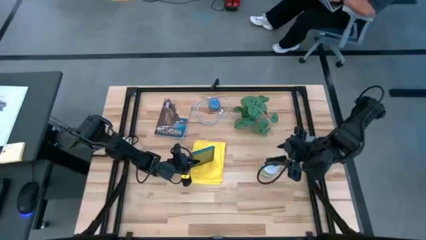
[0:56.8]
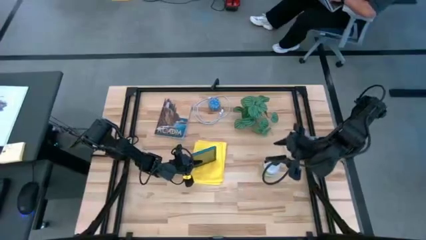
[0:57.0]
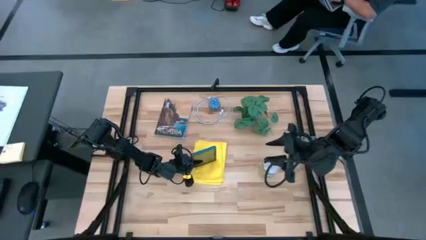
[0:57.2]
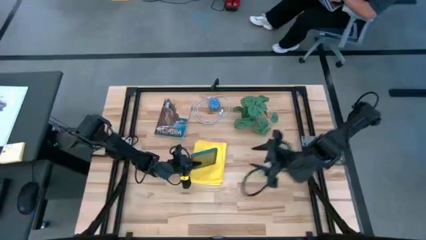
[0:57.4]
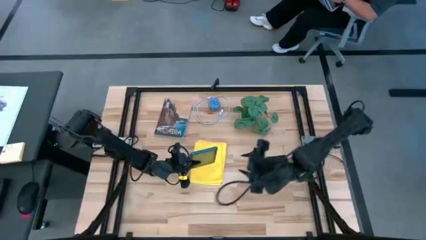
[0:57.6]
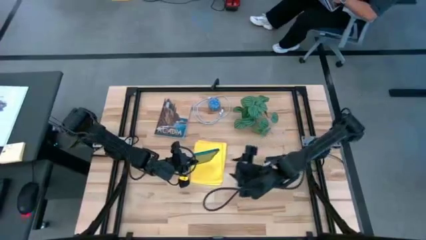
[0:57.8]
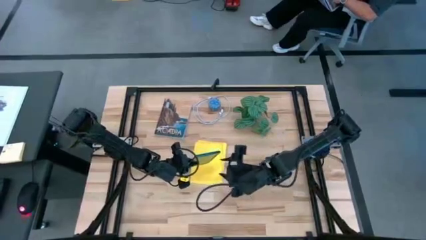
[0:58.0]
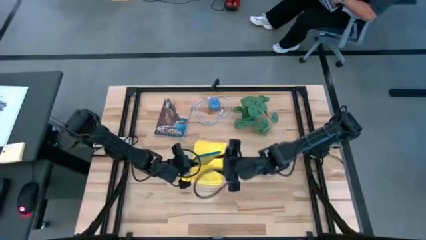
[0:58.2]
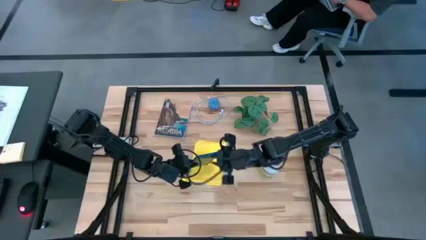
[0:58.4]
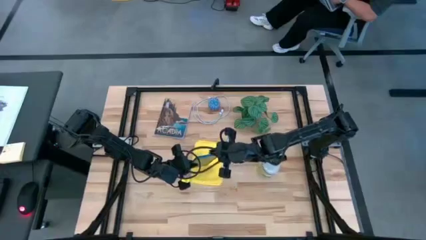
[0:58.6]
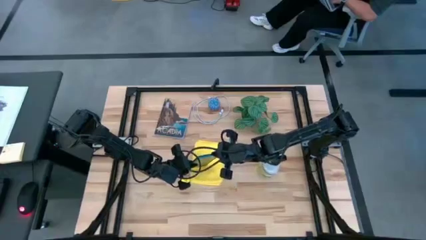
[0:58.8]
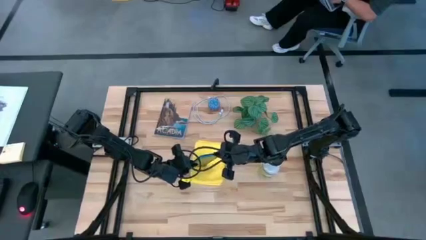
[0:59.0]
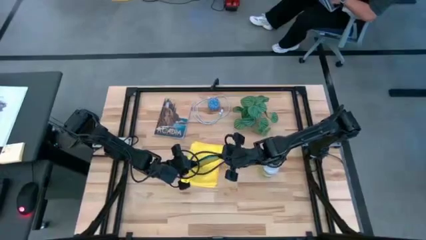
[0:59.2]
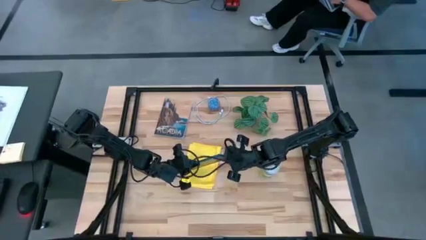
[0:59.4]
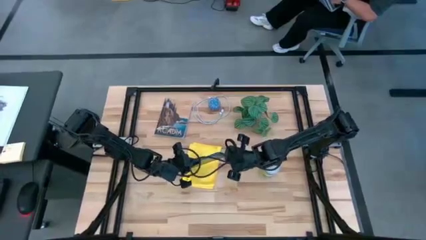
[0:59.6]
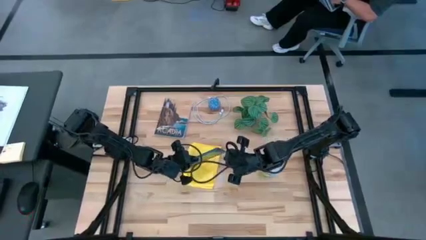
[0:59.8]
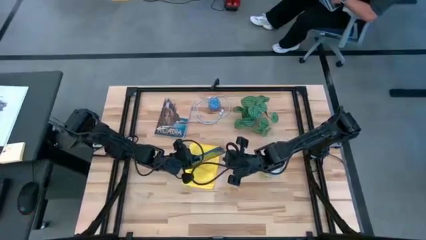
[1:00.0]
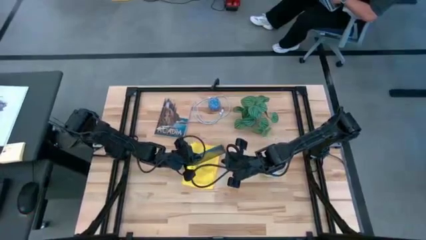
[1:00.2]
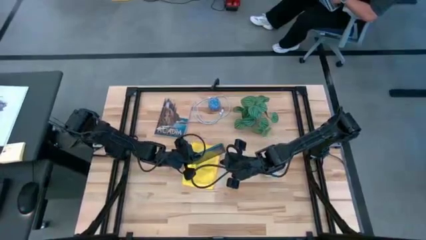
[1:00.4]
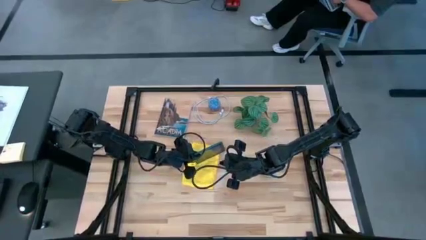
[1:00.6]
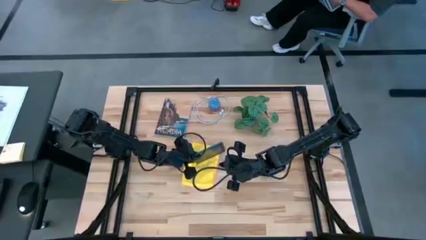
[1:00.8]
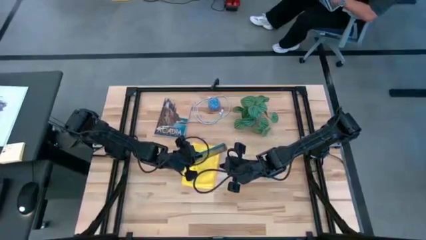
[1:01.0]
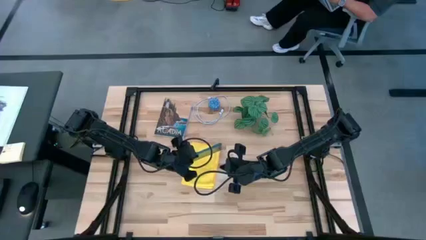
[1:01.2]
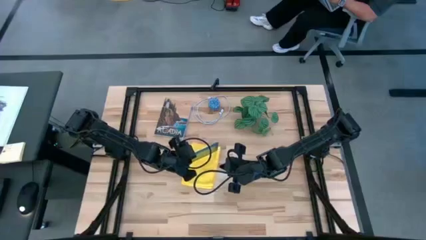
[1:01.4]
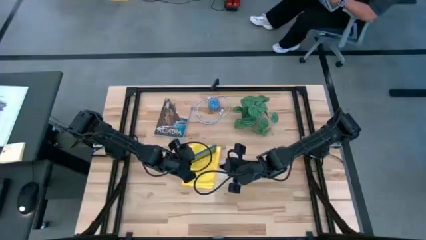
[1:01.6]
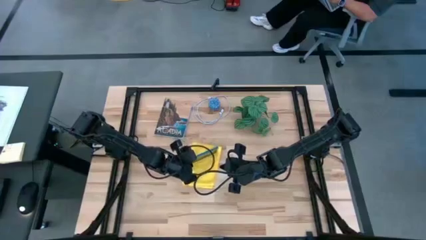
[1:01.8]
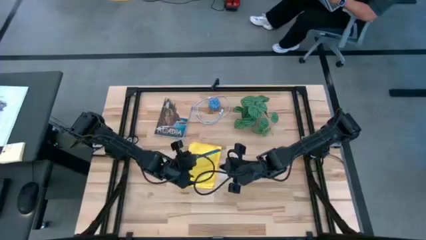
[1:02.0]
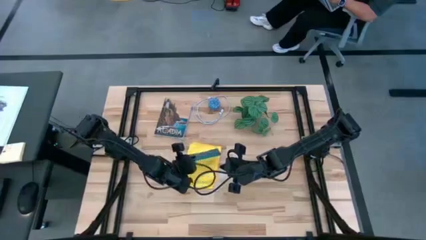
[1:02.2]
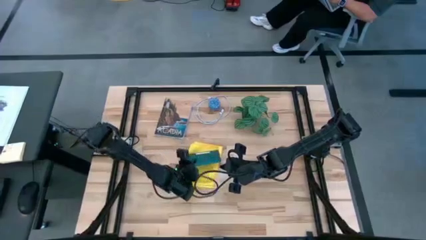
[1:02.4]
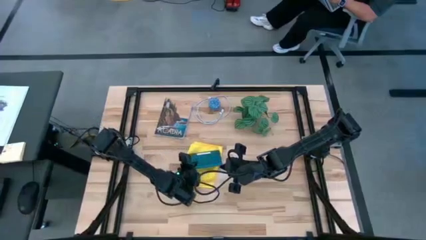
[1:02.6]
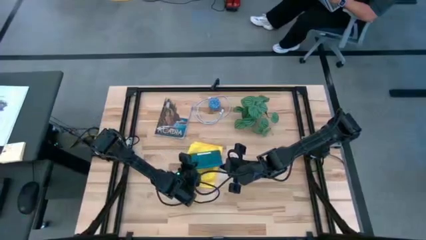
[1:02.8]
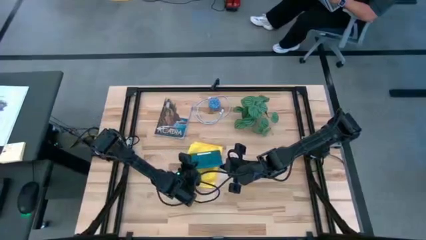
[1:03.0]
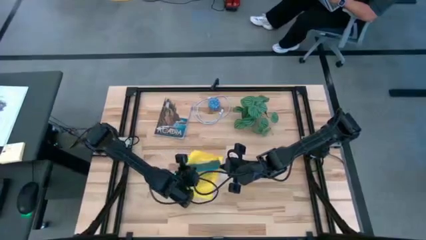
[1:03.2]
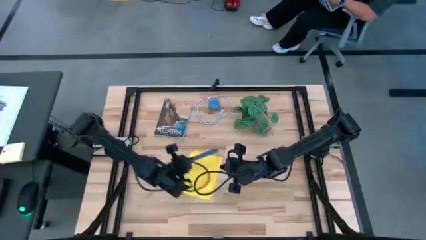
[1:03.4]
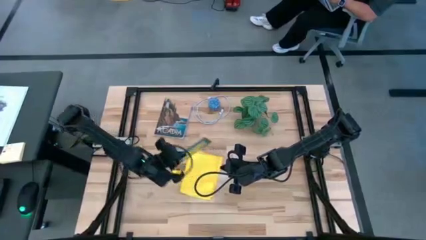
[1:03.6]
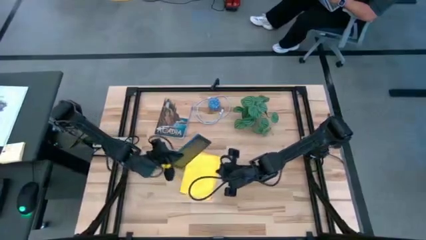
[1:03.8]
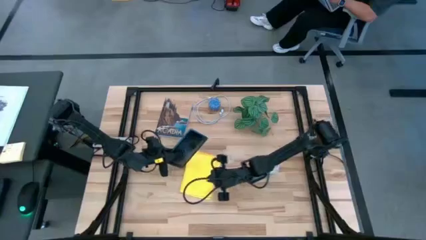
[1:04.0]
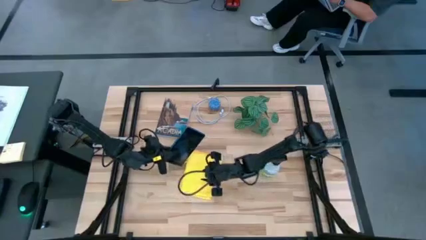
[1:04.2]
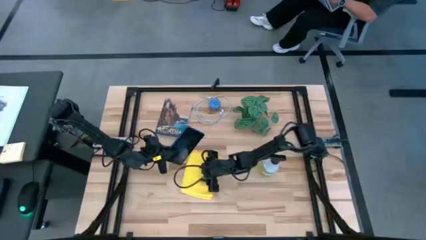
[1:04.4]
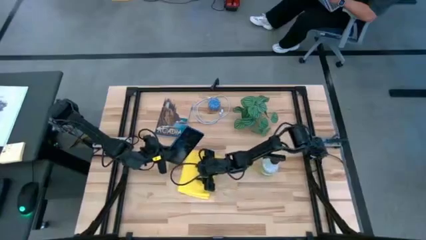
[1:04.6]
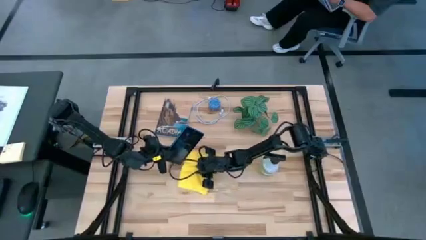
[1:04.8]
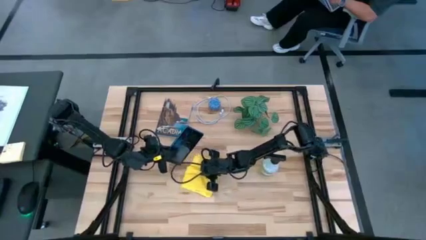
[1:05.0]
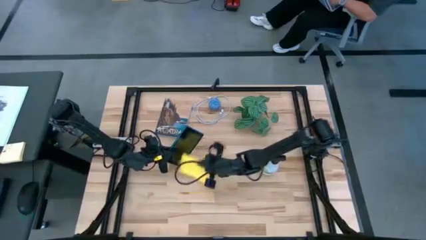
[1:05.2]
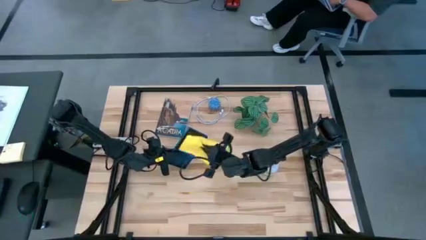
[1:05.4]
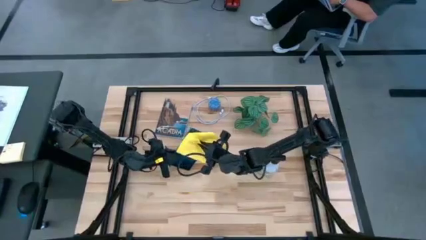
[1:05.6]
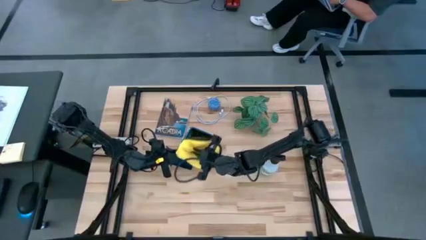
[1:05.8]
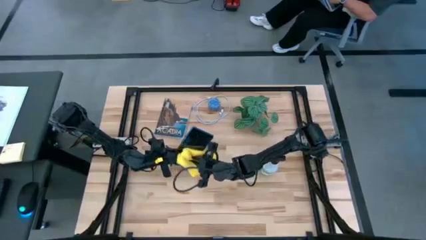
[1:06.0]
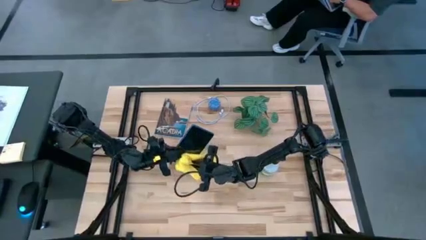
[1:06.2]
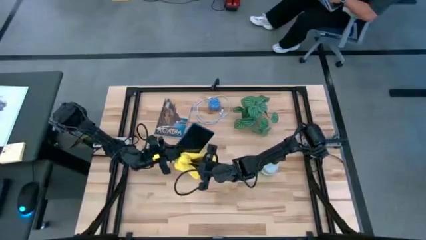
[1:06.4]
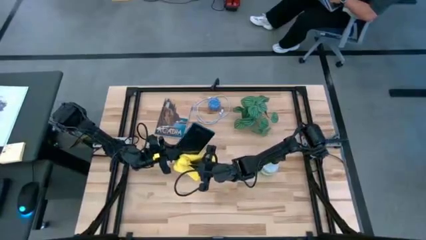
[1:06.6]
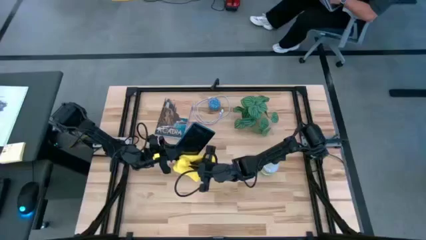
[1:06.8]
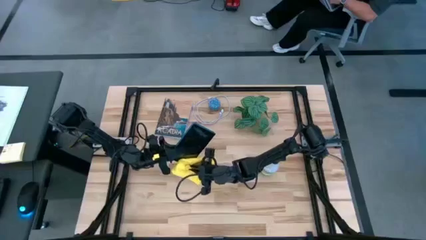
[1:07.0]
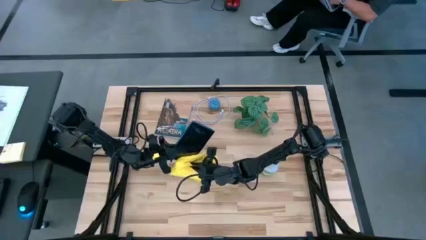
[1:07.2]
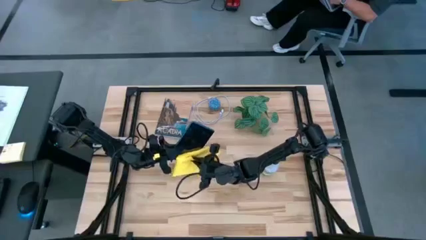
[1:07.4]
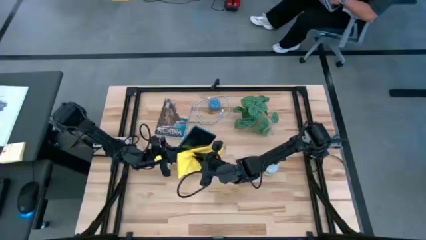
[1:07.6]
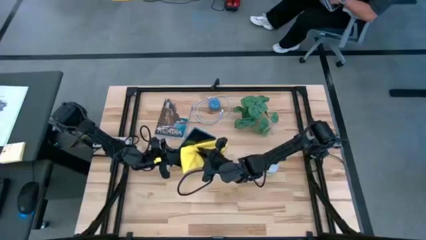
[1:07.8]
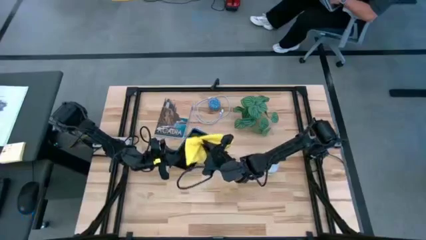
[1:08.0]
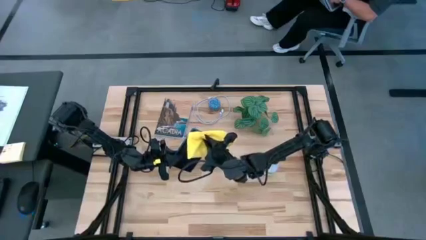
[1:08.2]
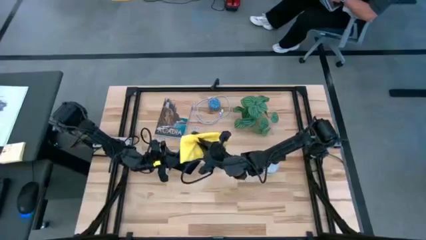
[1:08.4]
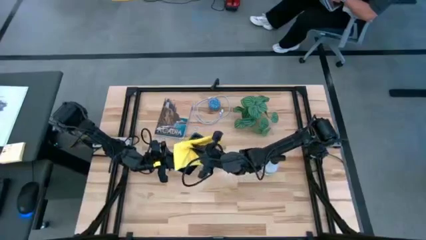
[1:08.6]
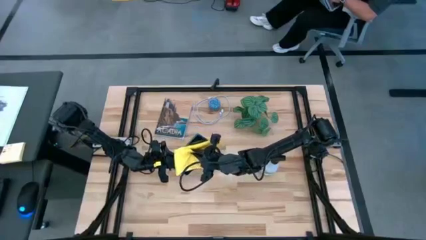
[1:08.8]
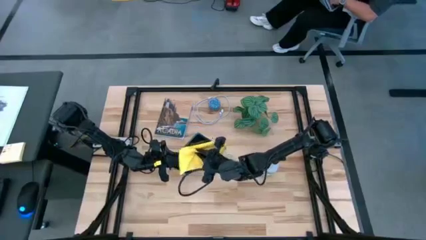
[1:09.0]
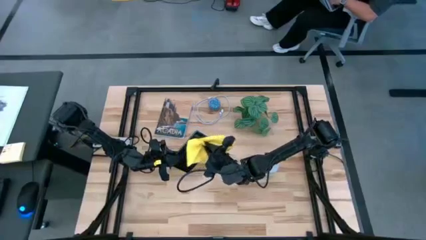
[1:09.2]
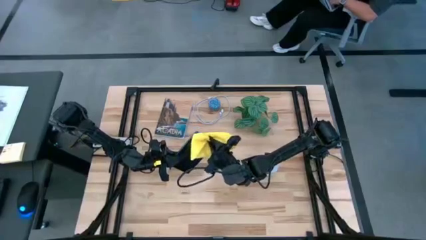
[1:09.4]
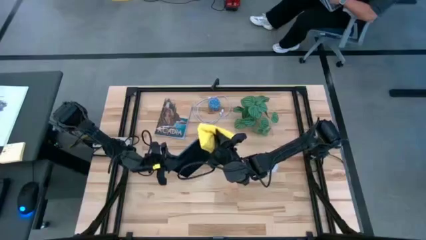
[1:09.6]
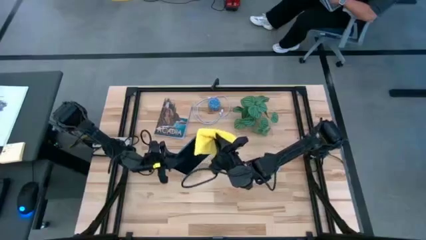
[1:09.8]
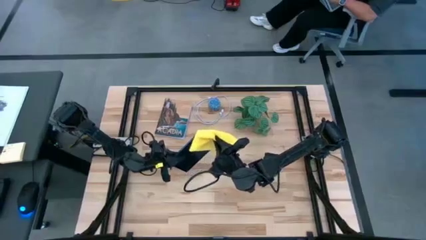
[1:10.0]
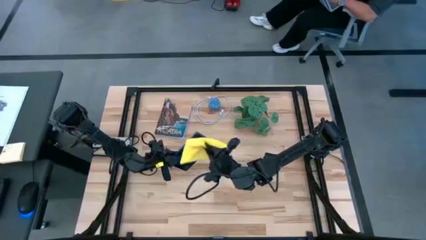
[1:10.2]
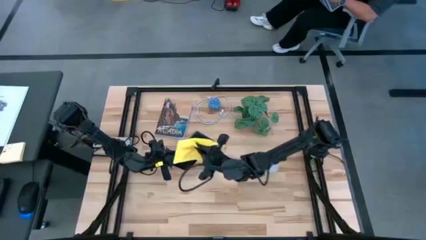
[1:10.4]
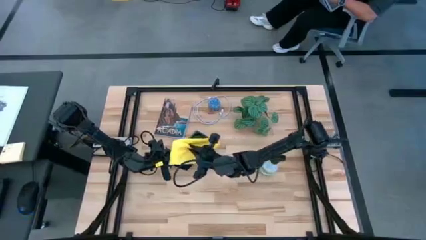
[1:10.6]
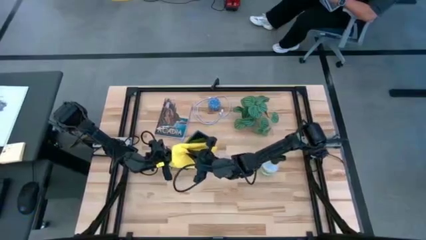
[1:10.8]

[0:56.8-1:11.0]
Task: Clean tablet
Wipe the front of the tablet using microfiber towel
